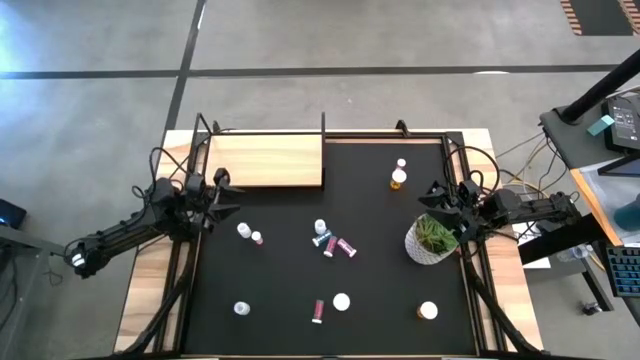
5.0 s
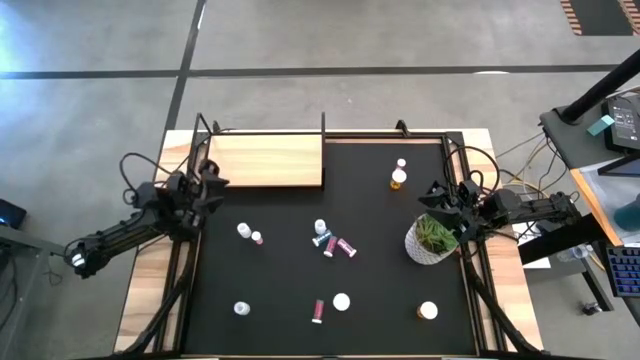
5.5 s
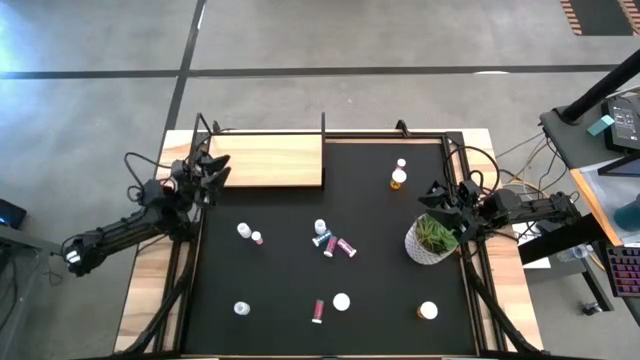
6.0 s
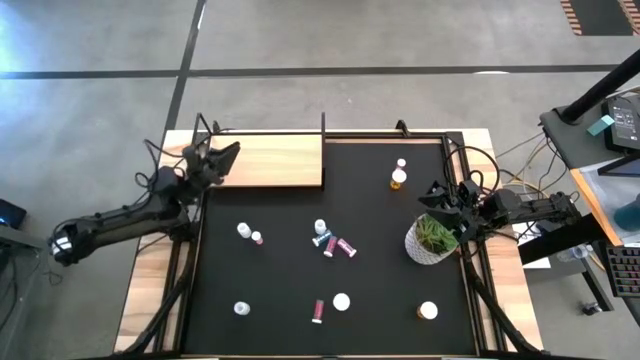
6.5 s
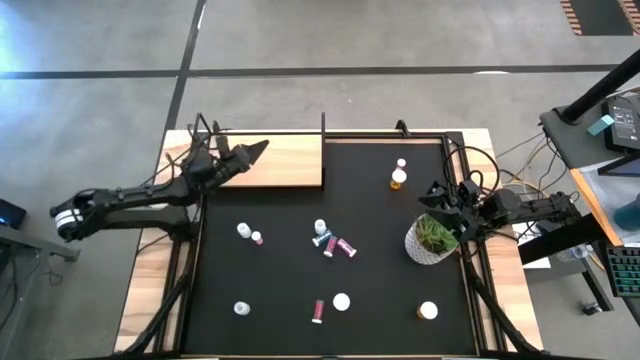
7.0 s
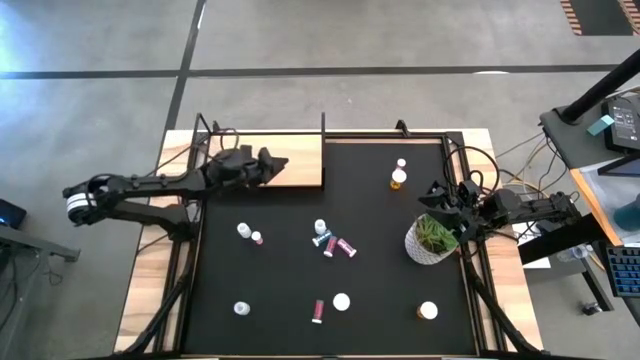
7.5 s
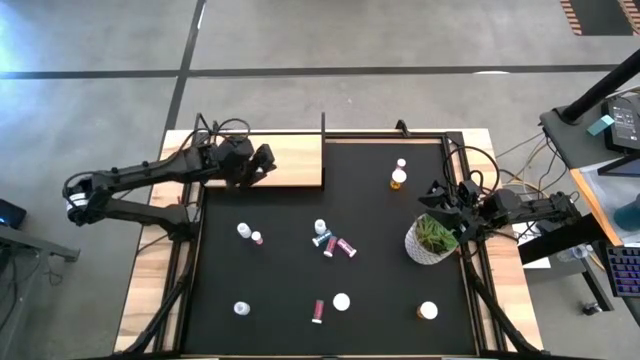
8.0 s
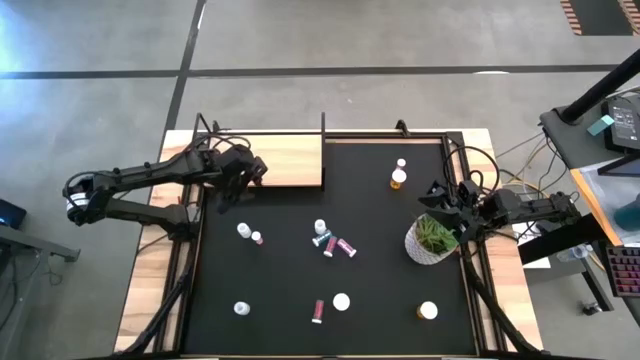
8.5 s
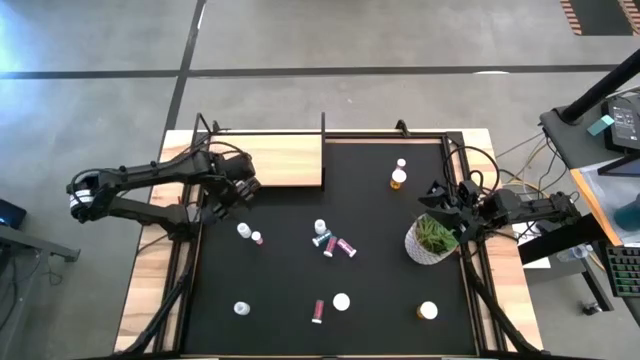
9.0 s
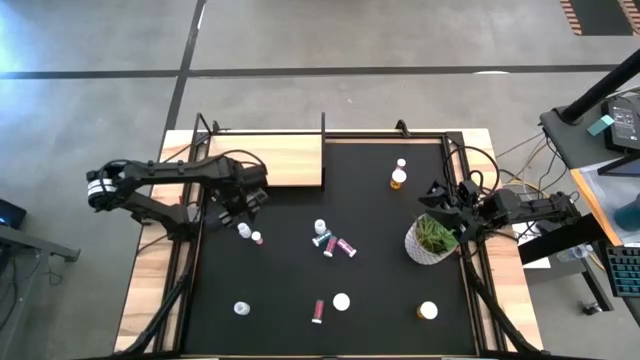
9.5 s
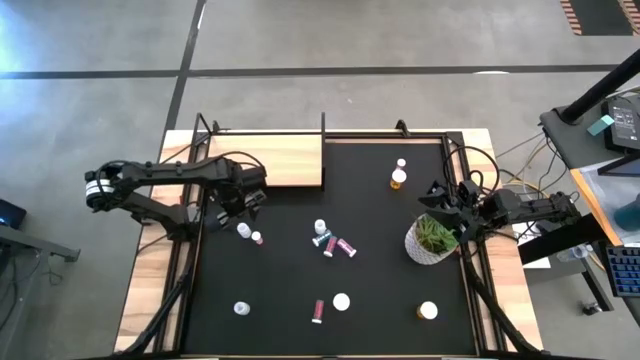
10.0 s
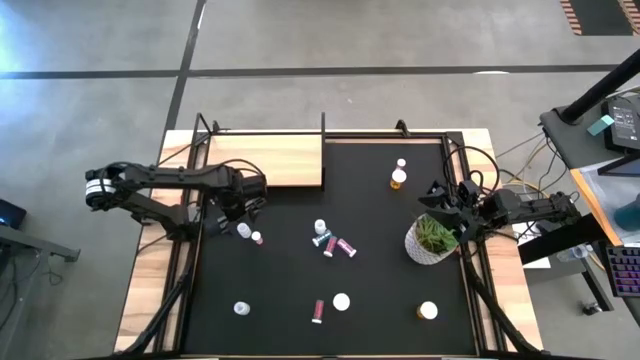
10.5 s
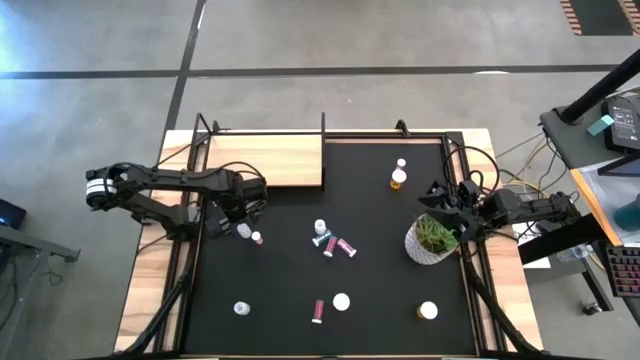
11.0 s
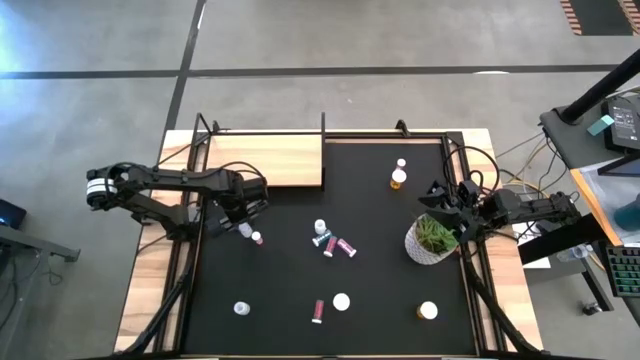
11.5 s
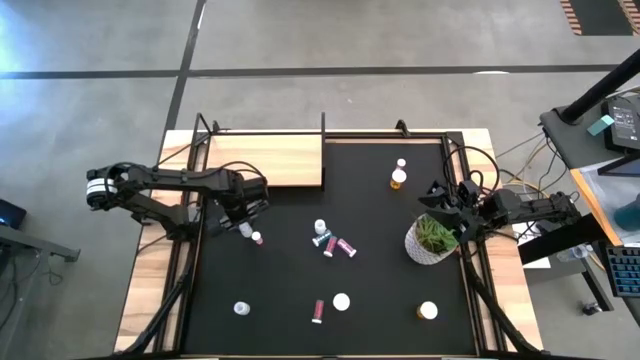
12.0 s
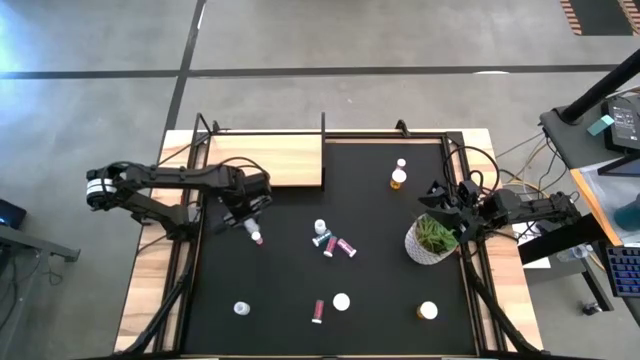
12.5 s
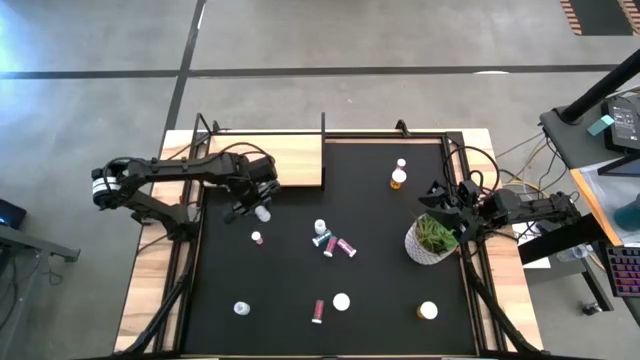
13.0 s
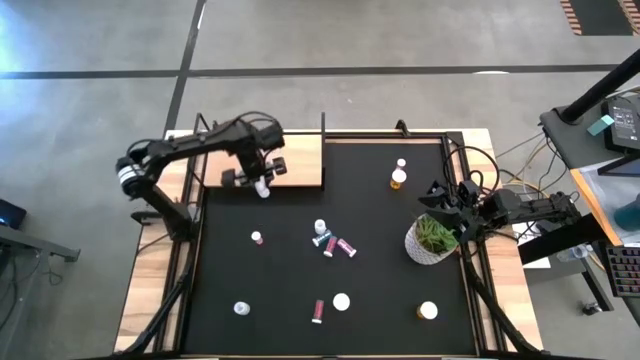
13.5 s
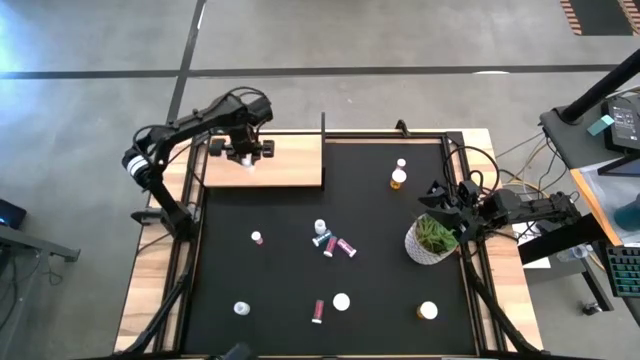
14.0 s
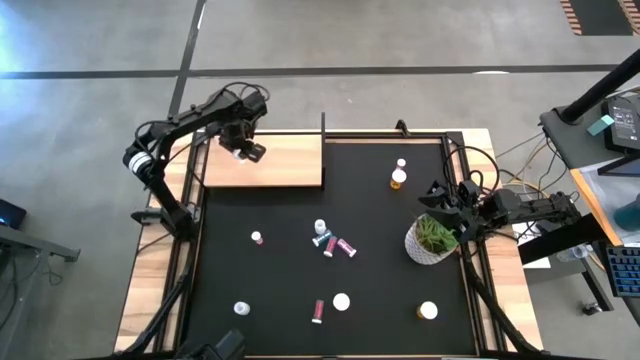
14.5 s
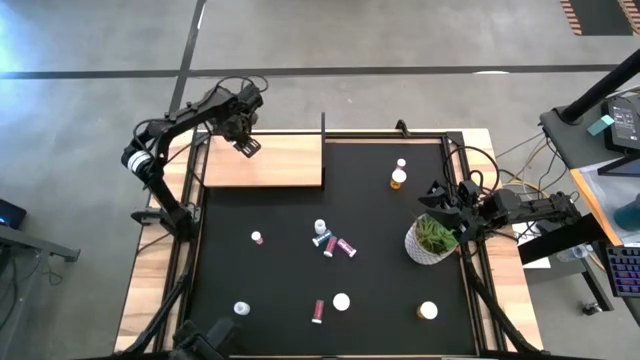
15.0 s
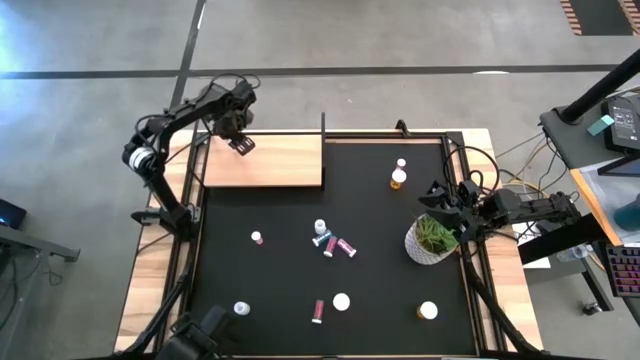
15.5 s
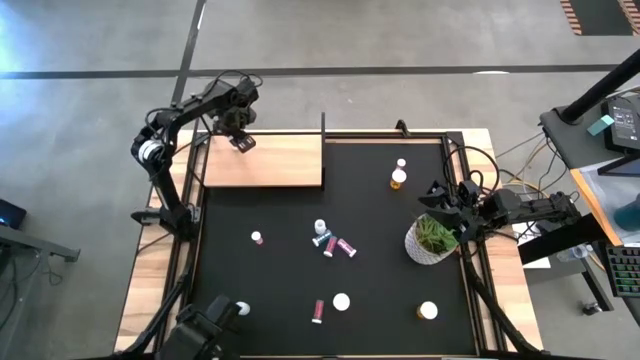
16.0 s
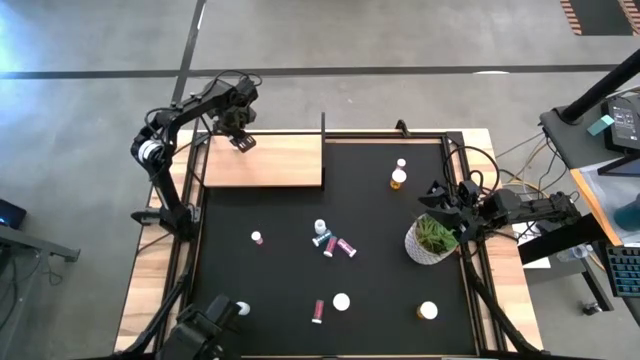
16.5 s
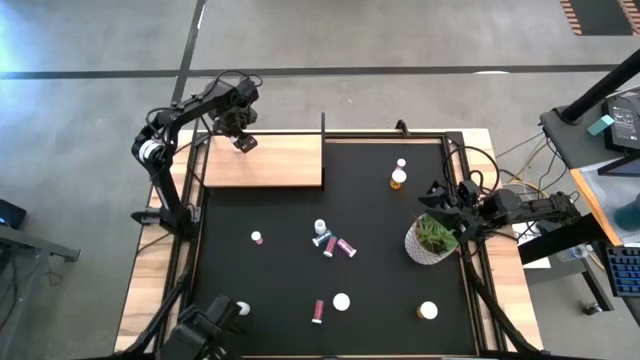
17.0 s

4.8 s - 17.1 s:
Task: Pick and place medicine bottles onto shelf by color
Put the top left white pill bottle into the shelf

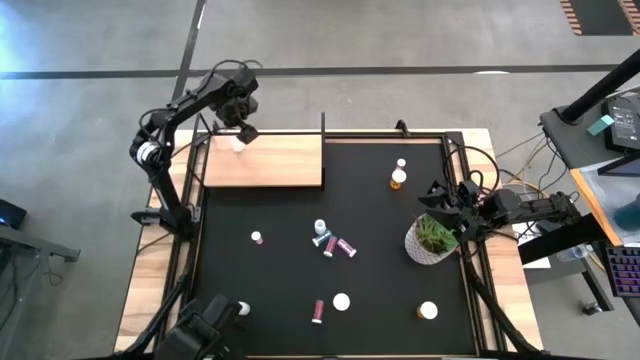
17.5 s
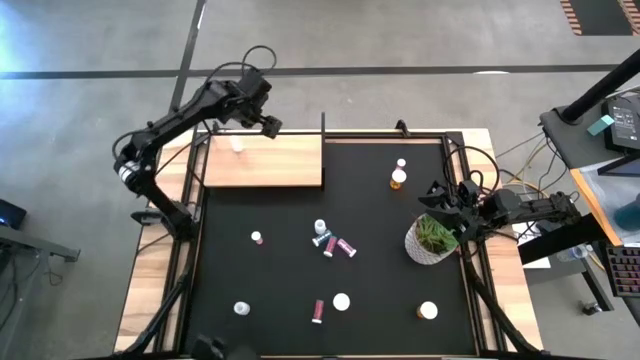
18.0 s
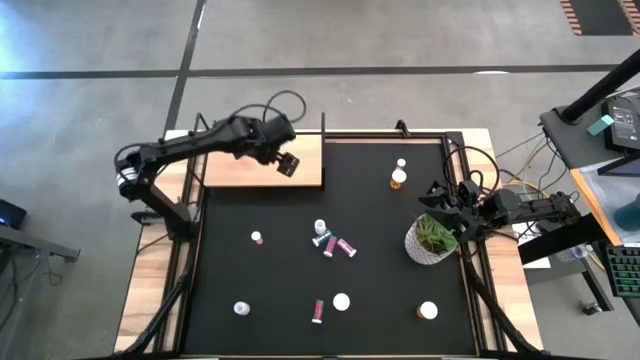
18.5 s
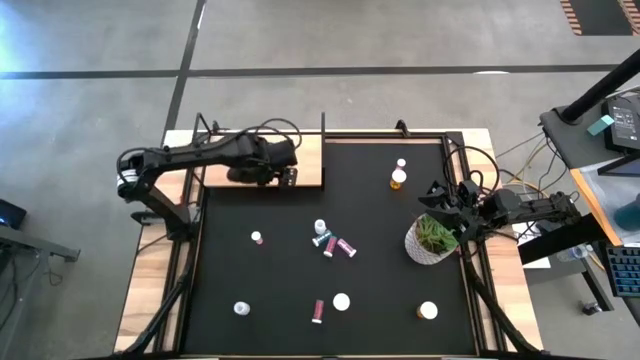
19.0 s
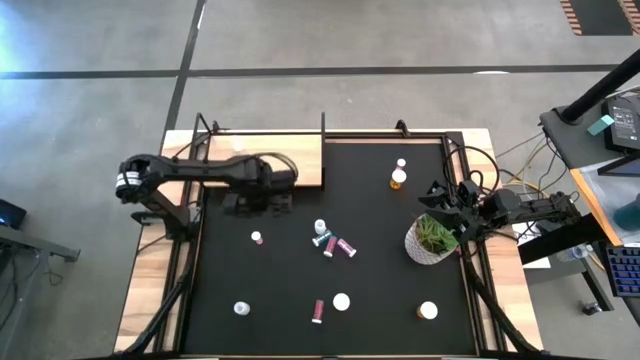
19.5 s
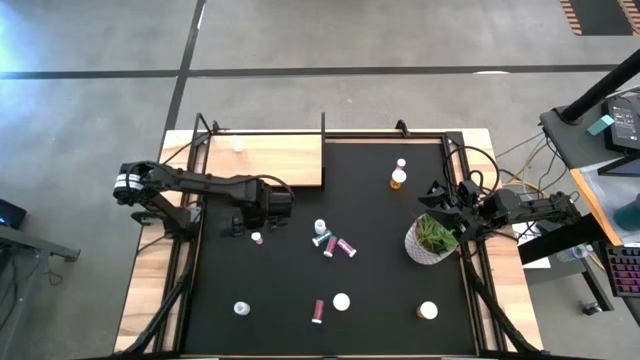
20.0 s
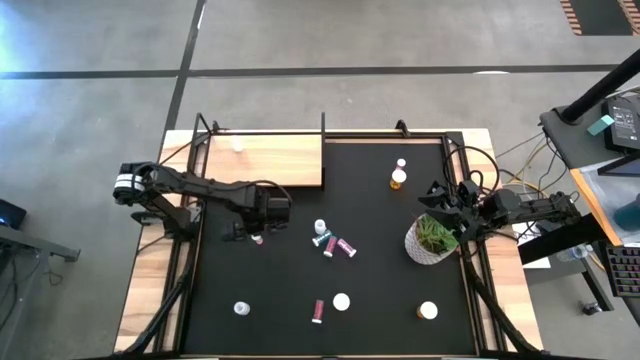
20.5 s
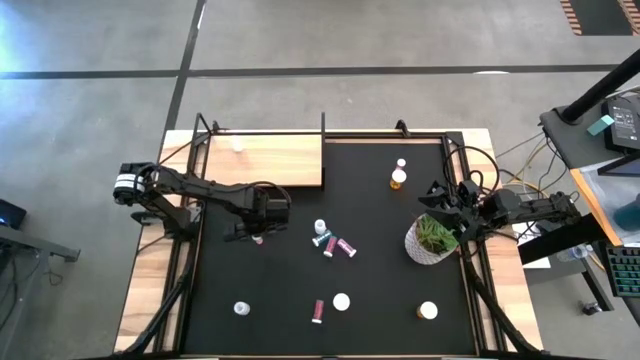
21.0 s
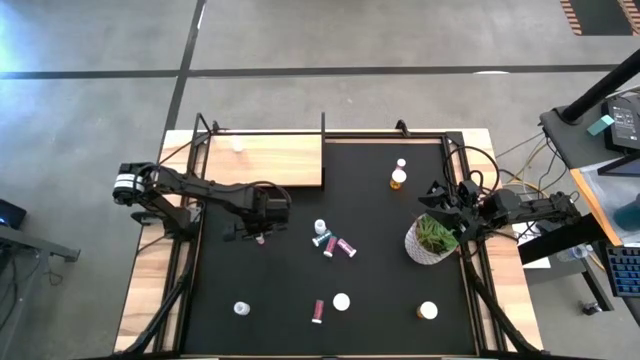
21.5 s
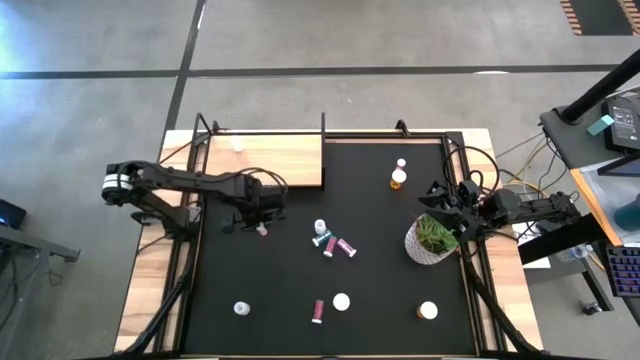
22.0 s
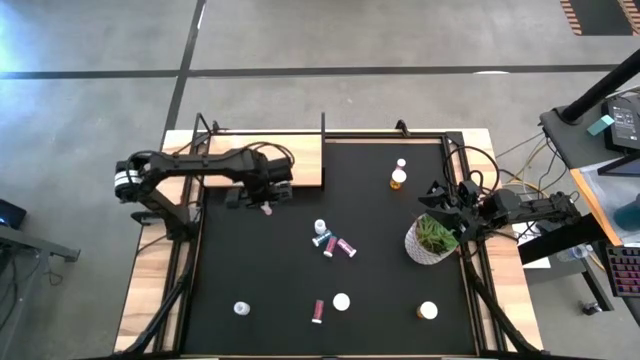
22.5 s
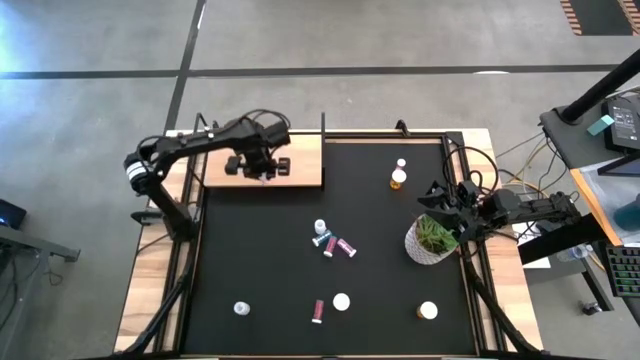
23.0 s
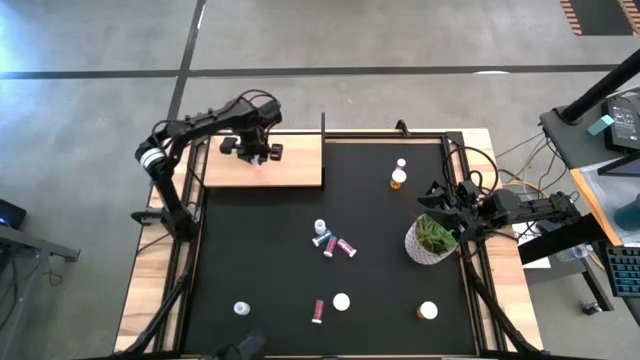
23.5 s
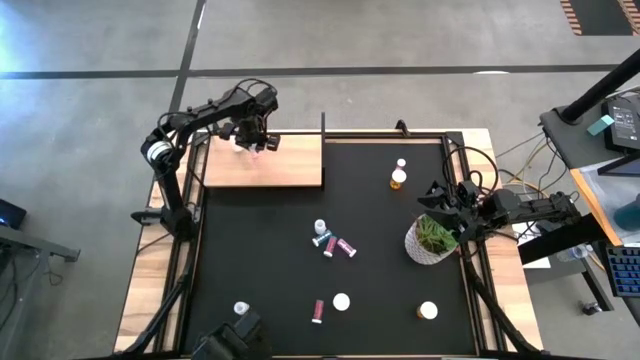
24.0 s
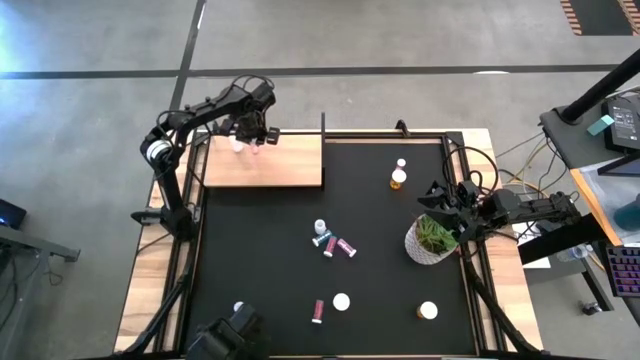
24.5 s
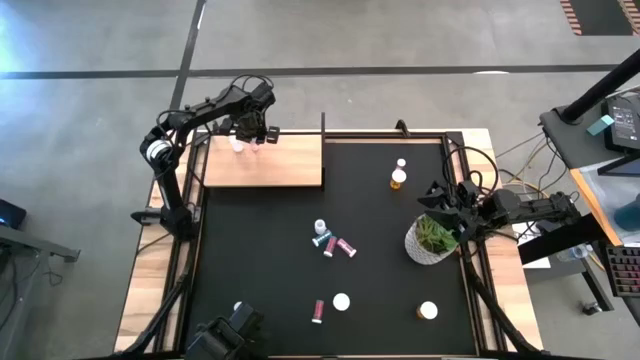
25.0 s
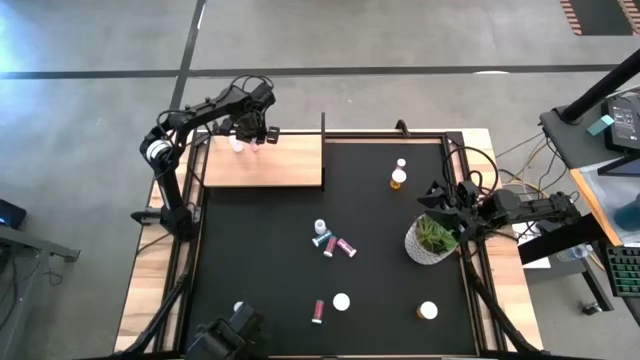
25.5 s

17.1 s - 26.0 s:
Put the bottom left pink pill bottle into the shelf
